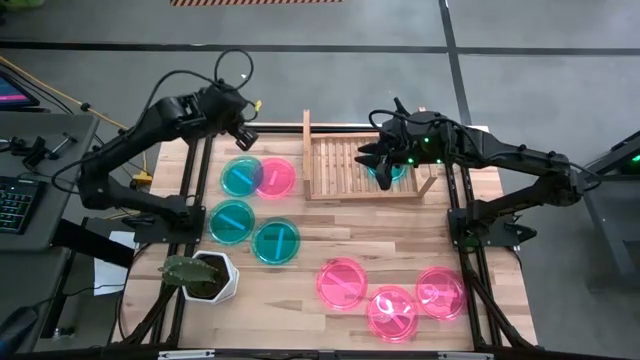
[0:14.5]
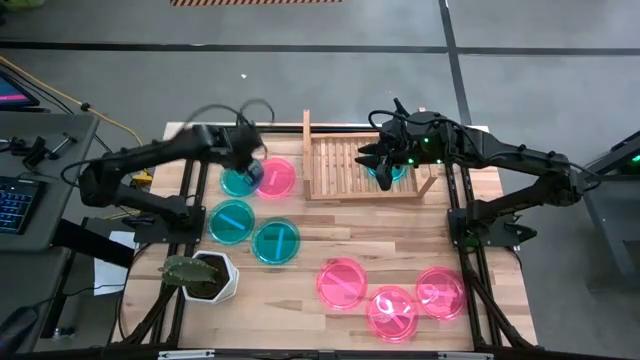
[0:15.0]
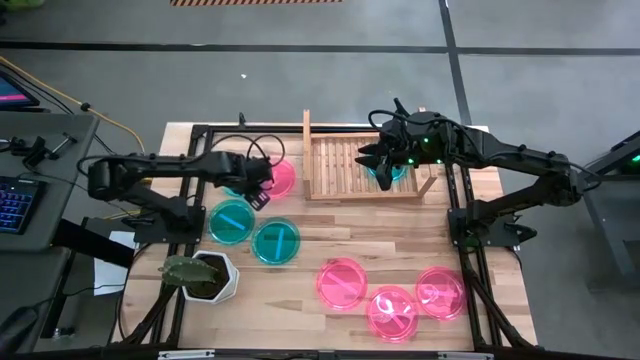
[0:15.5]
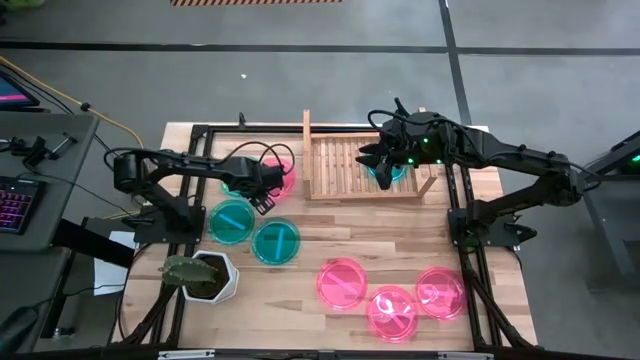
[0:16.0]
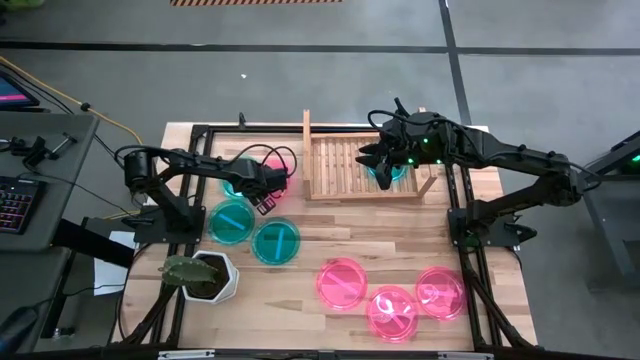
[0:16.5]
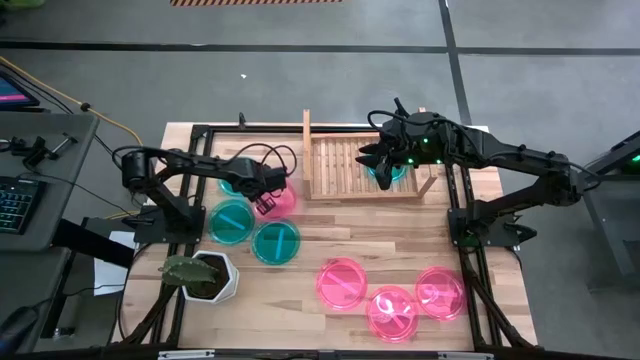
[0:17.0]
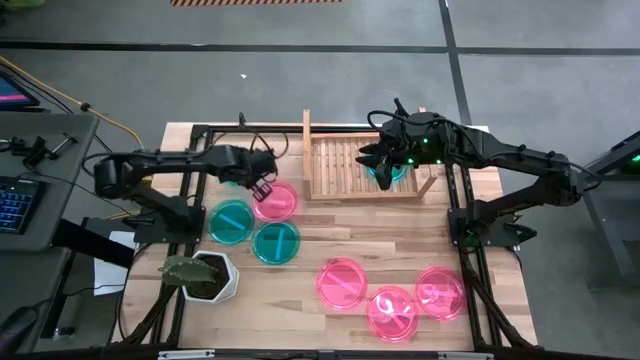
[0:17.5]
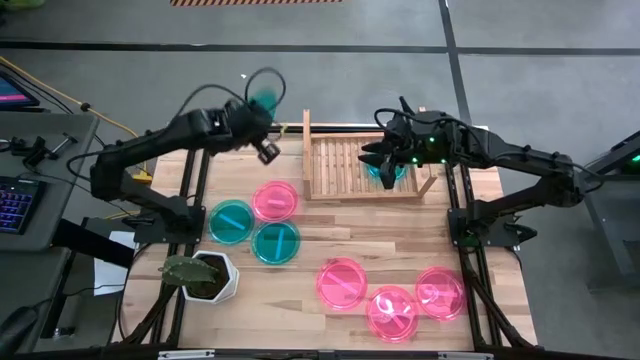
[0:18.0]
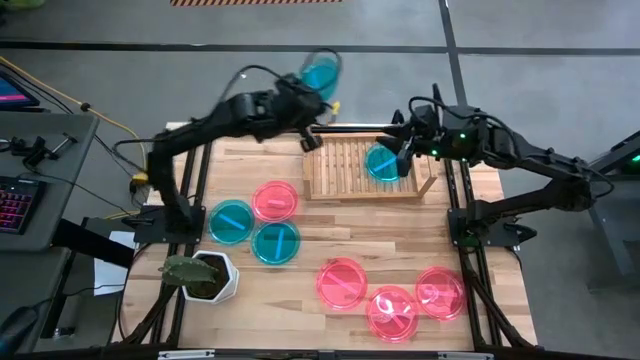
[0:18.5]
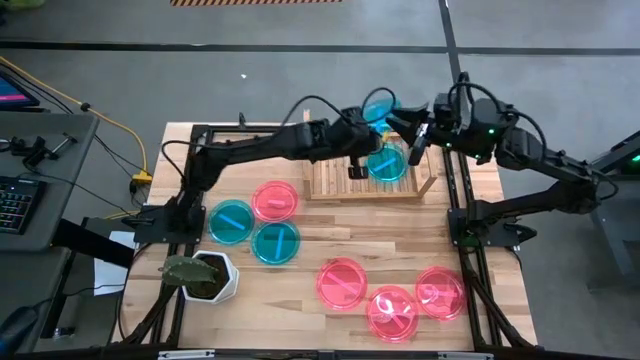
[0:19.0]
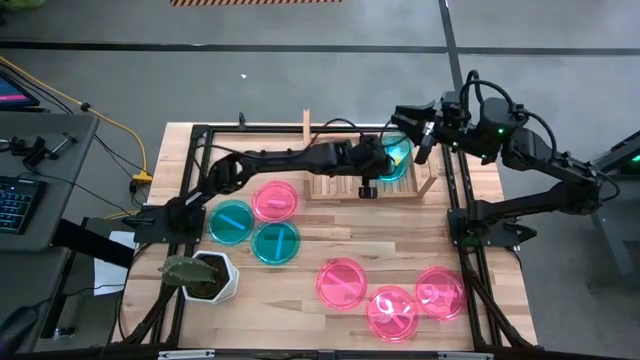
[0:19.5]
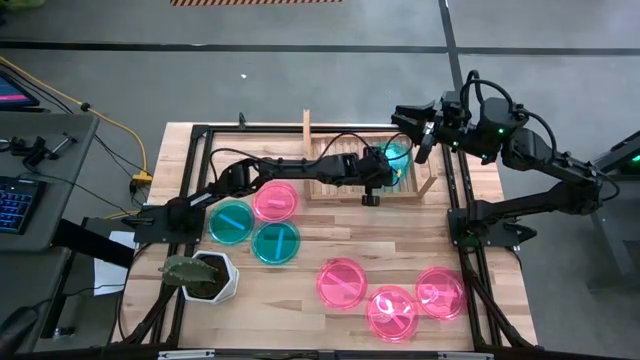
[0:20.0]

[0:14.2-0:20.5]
Task: Place and stack plates onto a shelf
Stack the blue plate on top of the other blue plate on the shelf

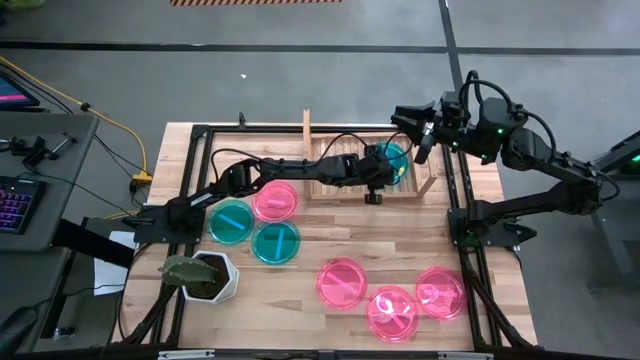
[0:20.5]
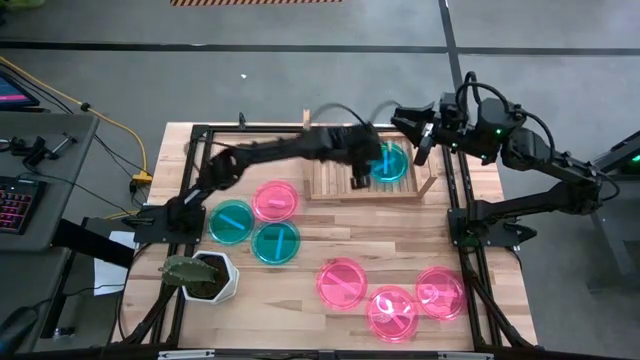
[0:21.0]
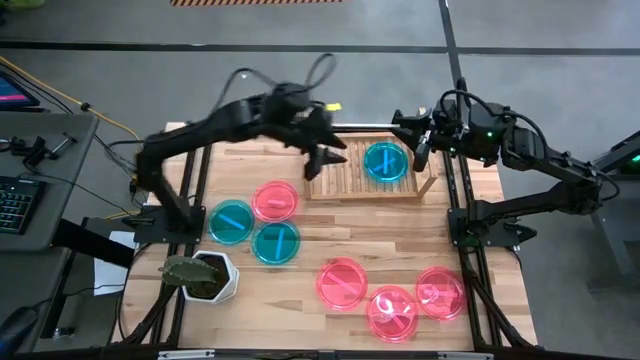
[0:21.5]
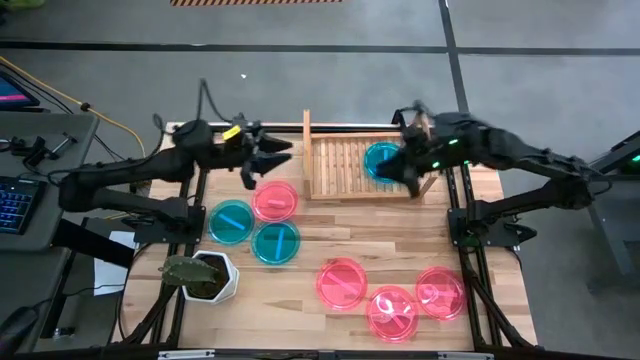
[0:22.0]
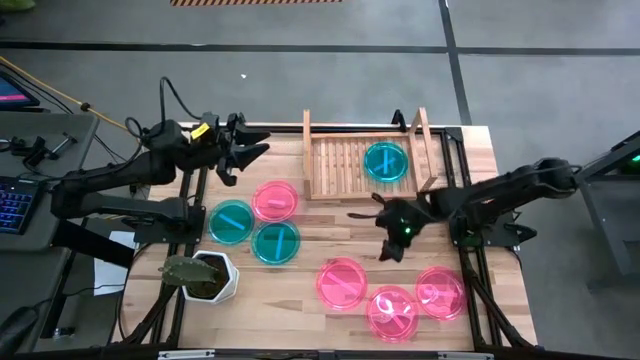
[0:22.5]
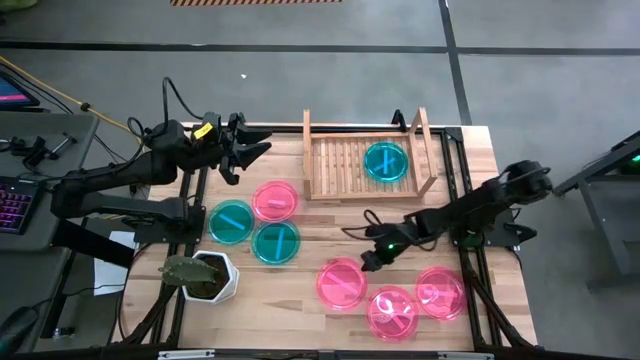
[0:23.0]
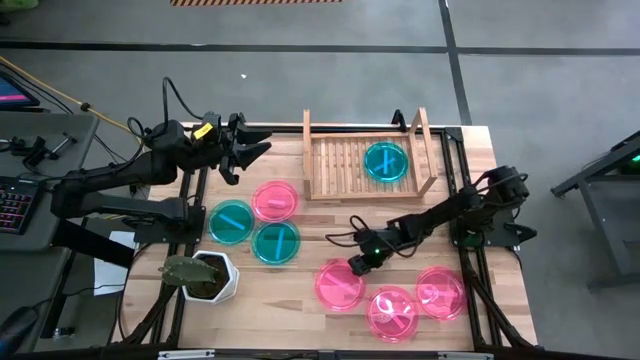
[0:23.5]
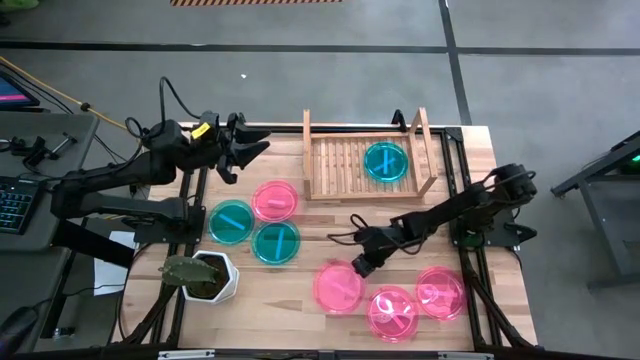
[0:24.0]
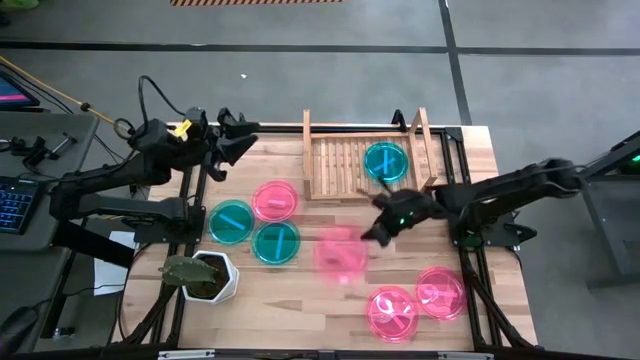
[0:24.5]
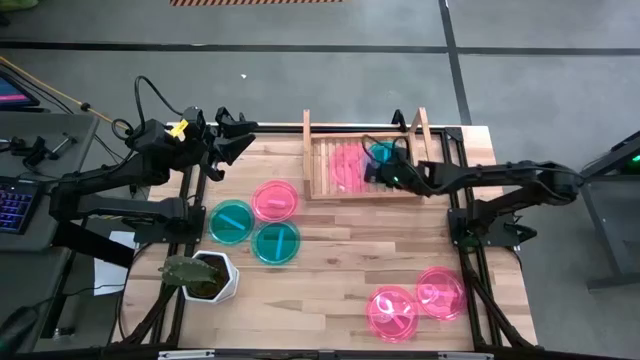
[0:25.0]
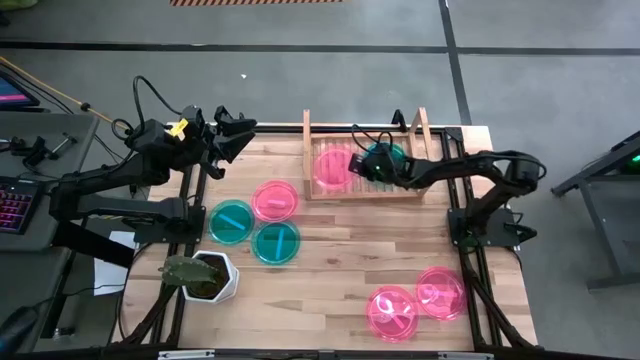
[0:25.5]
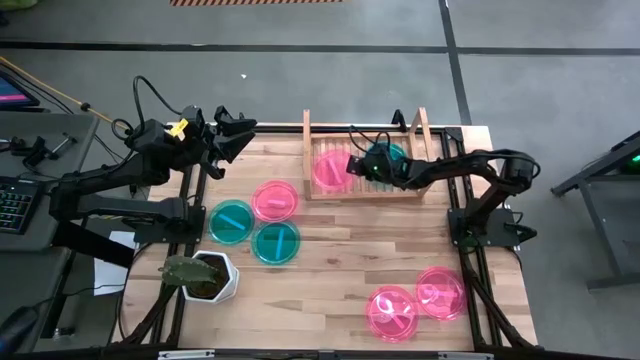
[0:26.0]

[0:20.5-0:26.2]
Put the pink plate on the shelf

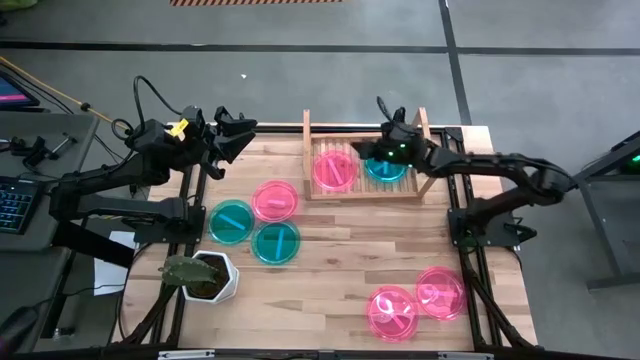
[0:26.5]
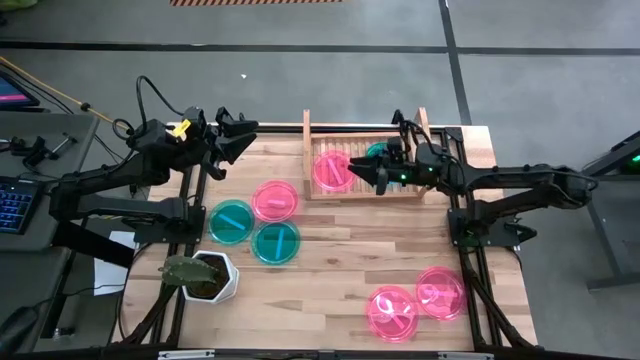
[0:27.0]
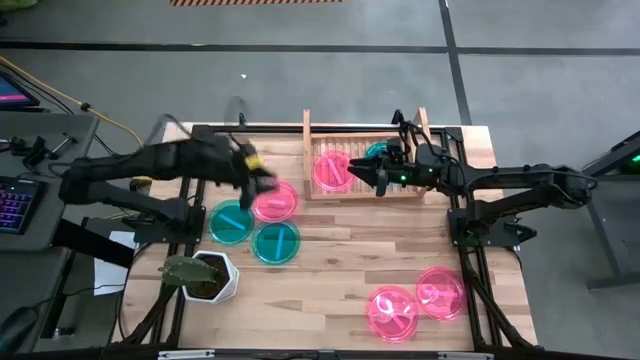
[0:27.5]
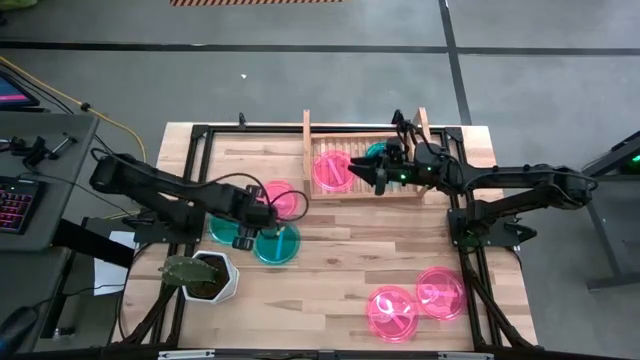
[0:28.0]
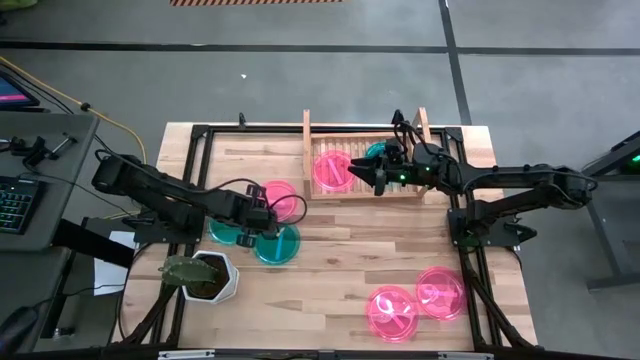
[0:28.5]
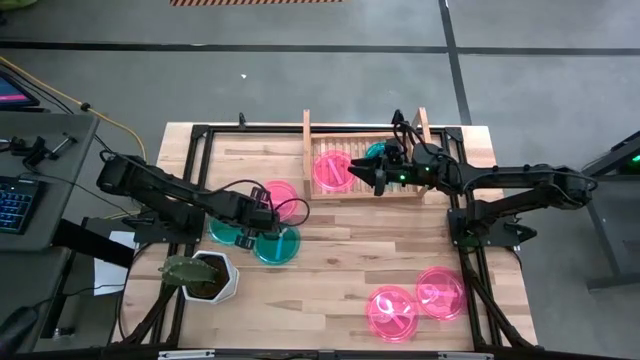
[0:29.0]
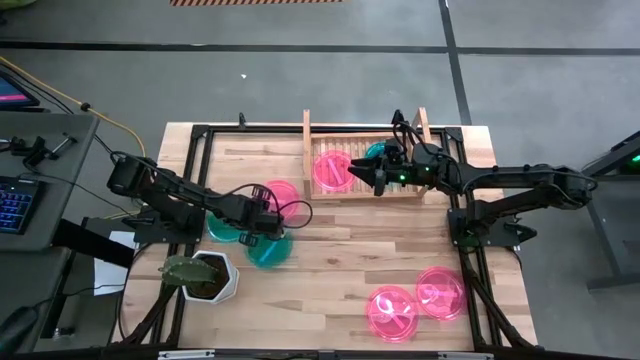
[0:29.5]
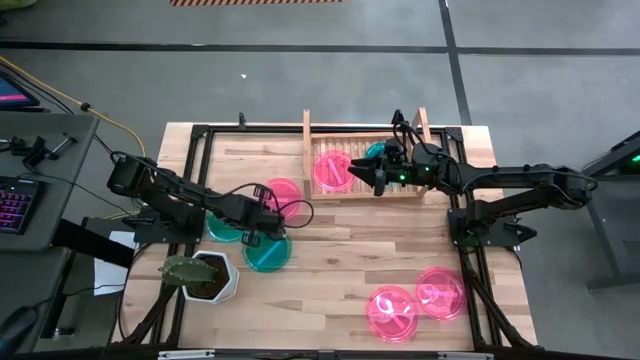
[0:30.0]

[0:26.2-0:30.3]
Stack the pink plate on top of the other pink plate on the shelf

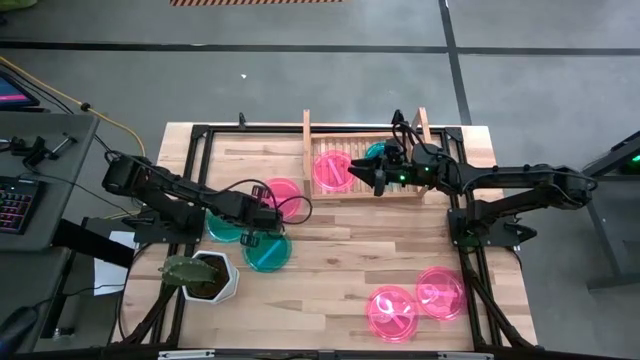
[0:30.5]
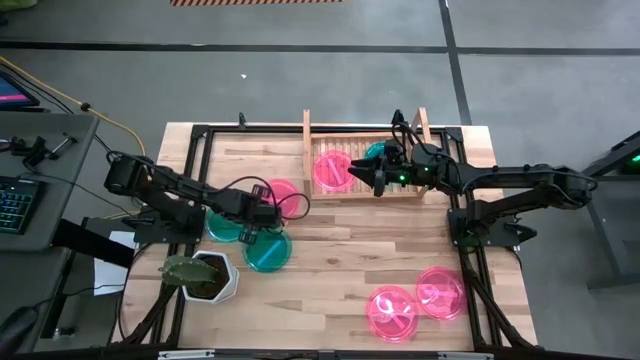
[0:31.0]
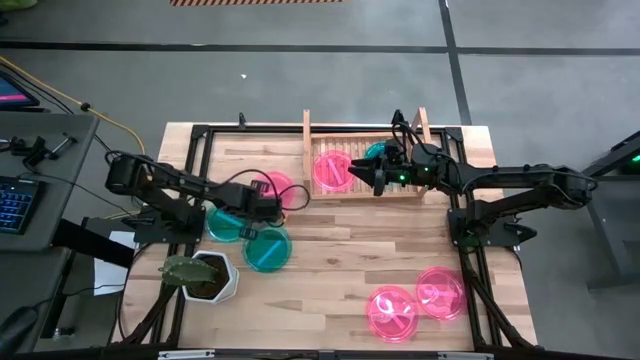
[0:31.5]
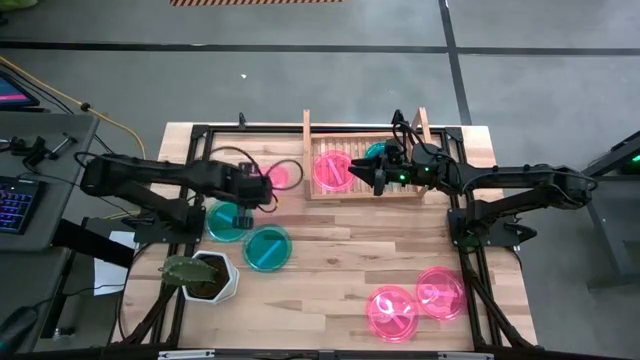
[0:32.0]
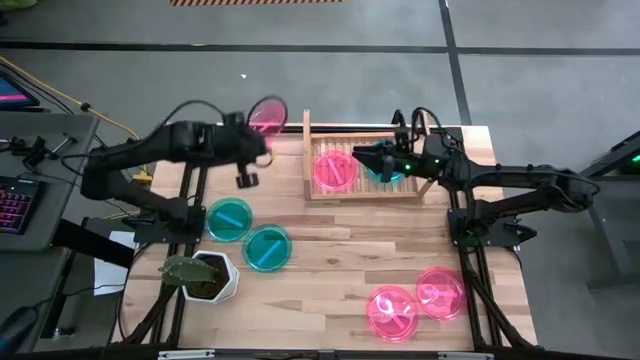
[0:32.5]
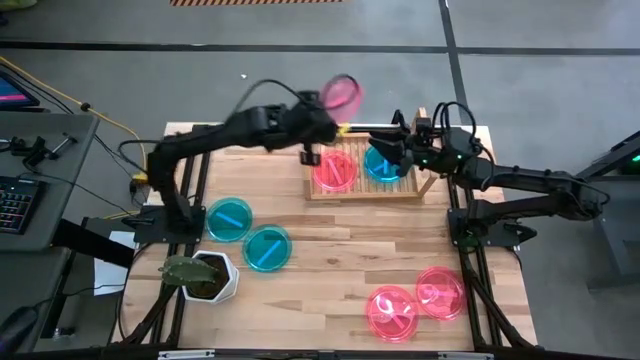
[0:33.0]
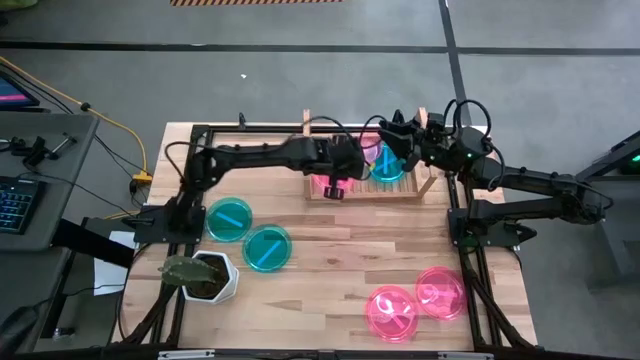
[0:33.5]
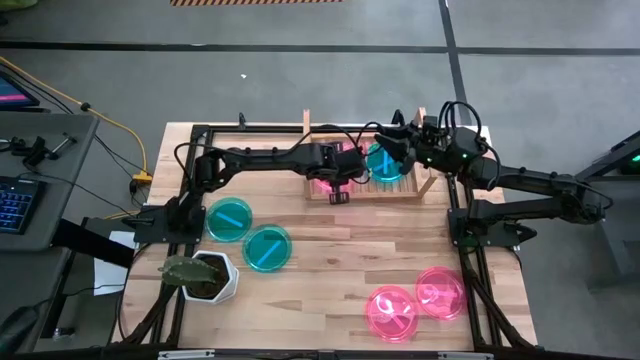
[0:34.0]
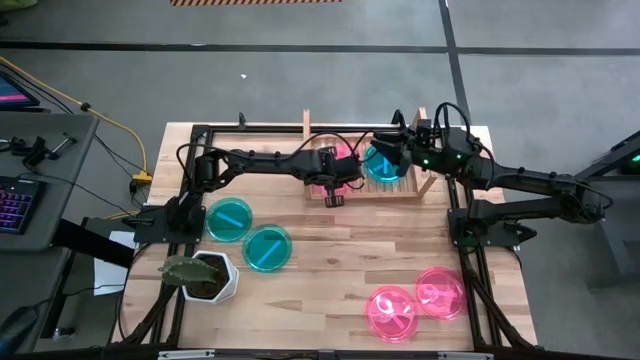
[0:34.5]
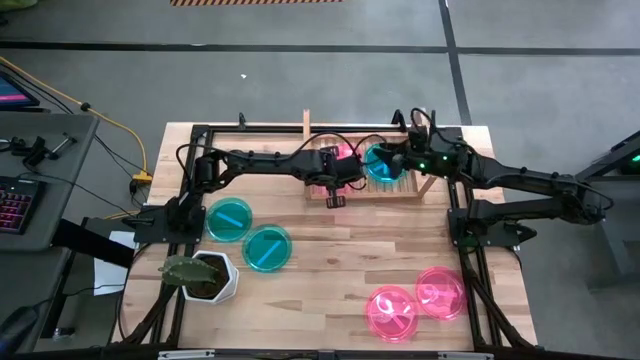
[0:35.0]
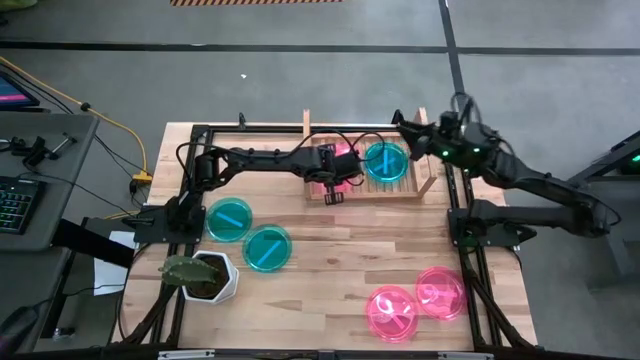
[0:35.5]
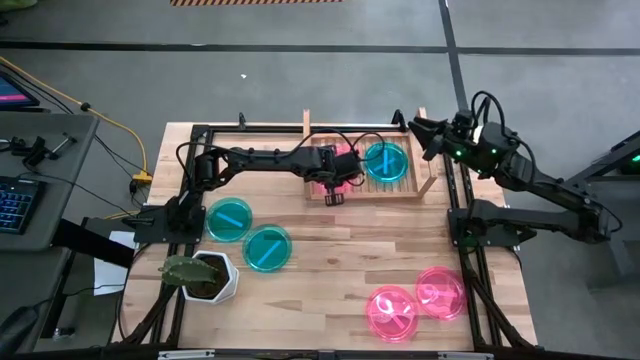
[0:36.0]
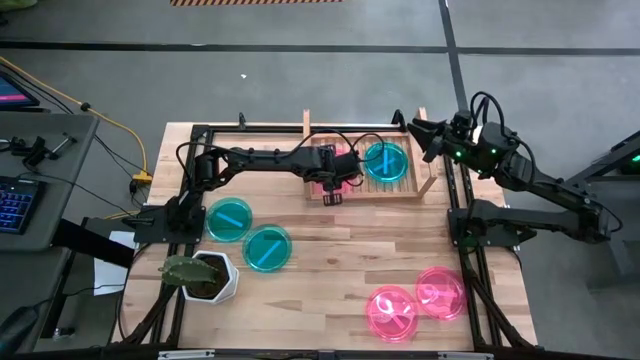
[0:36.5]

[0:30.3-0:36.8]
Stack the pink plate on top of the other pink plate on the shelf
